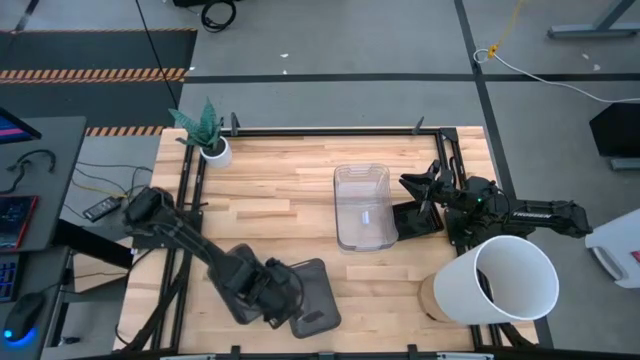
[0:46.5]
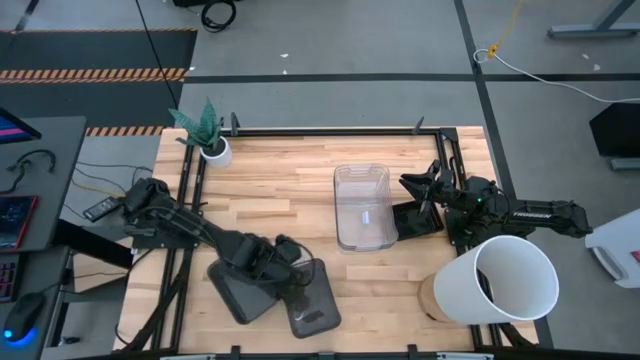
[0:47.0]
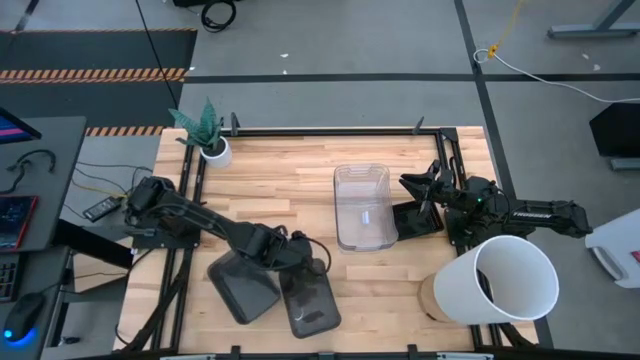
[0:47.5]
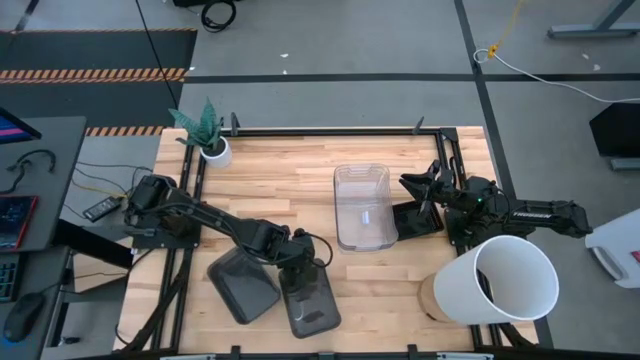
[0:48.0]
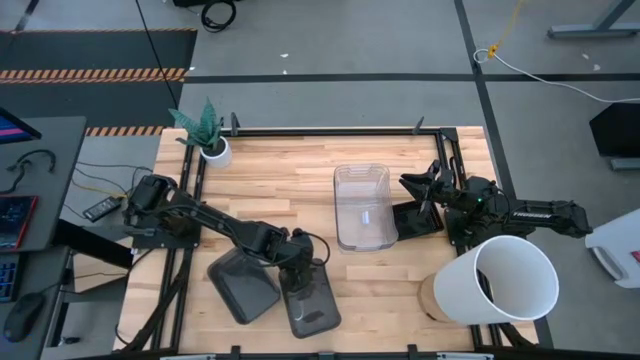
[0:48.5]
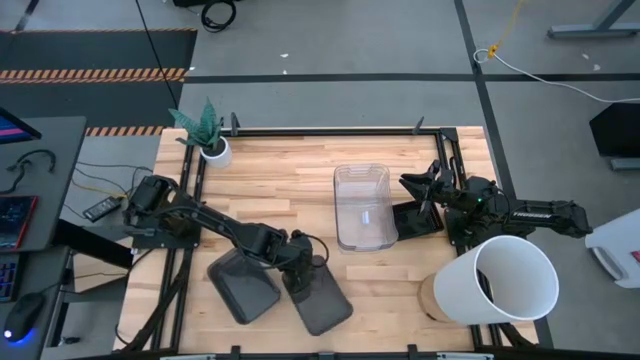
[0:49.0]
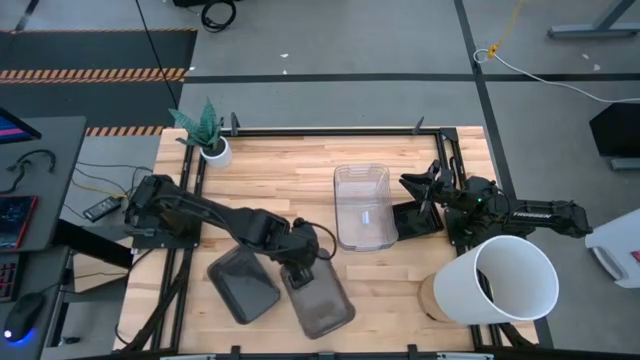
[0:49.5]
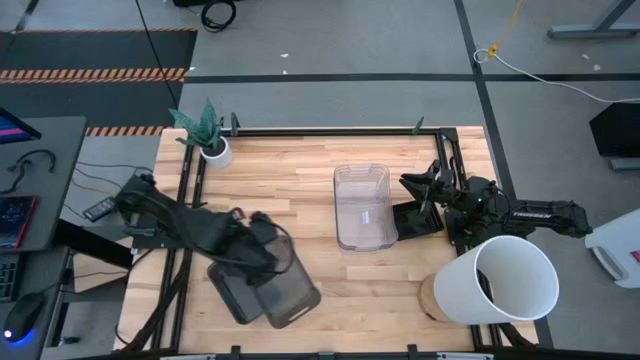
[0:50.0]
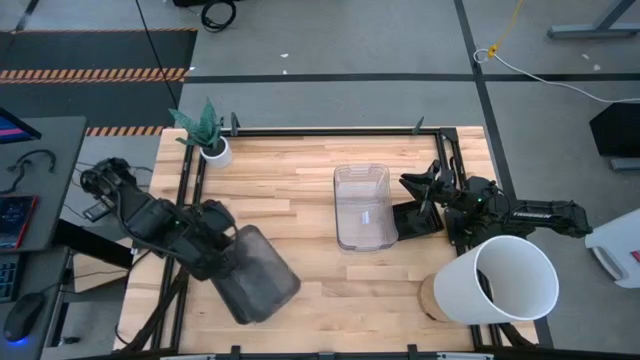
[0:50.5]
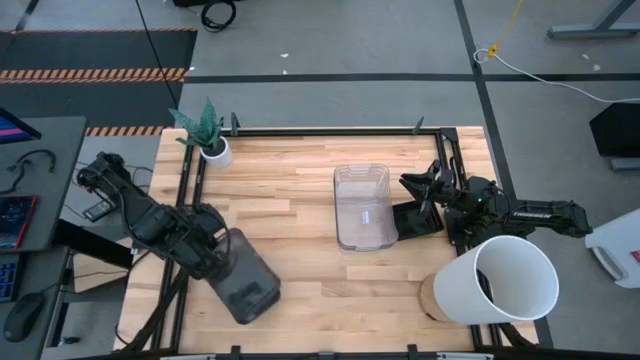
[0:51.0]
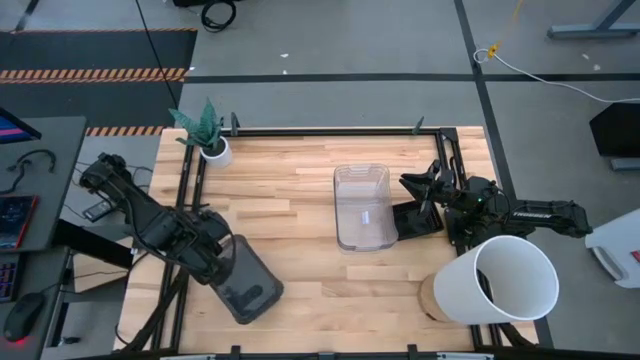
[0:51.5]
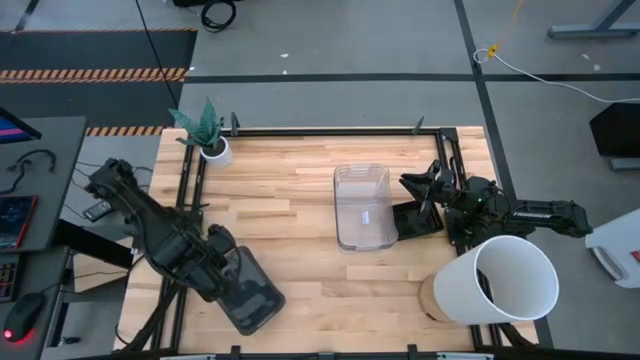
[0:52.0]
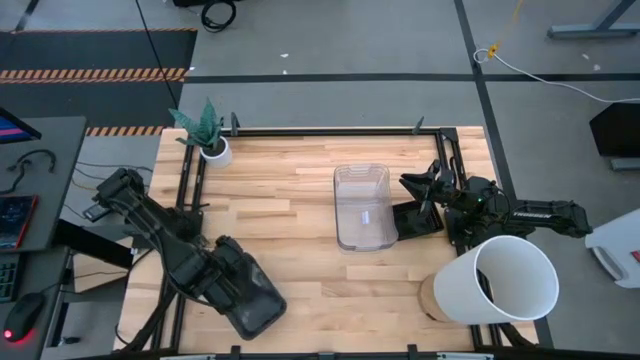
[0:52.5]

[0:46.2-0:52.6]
Stack the right black transparent bin on the stacked left black transparent bin

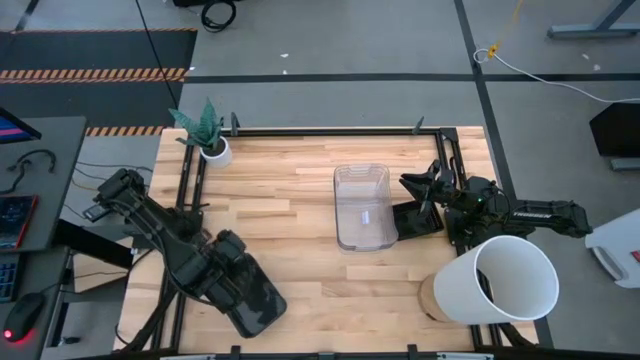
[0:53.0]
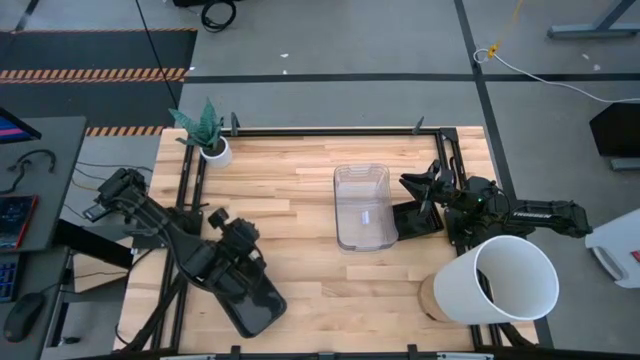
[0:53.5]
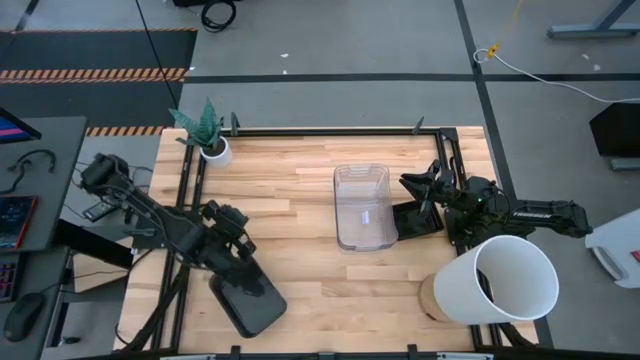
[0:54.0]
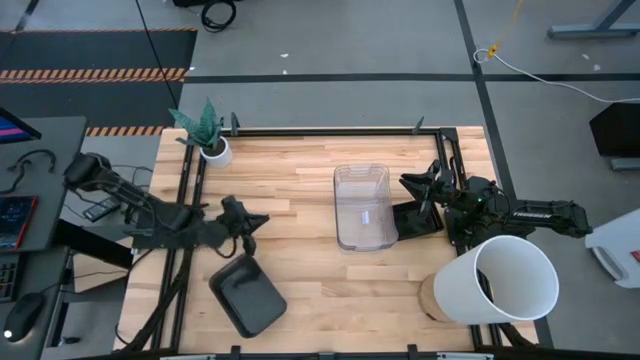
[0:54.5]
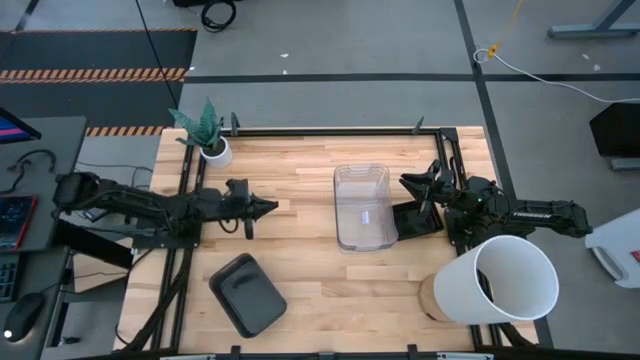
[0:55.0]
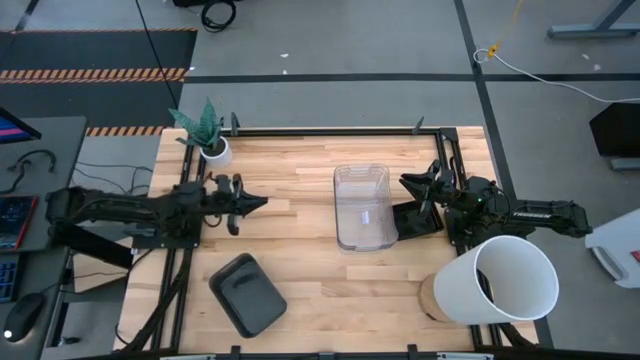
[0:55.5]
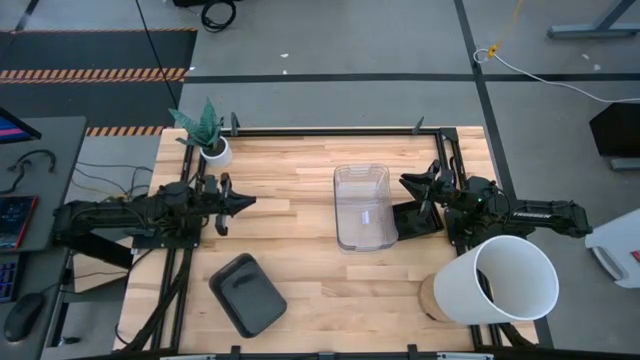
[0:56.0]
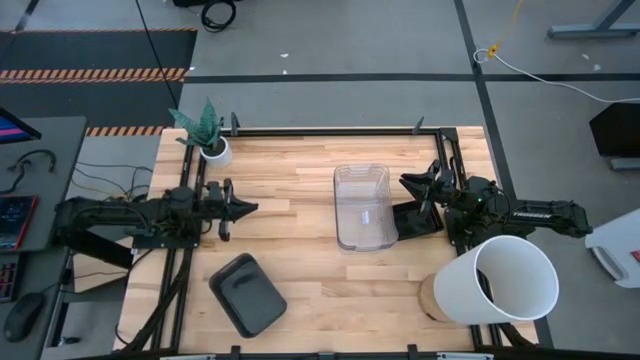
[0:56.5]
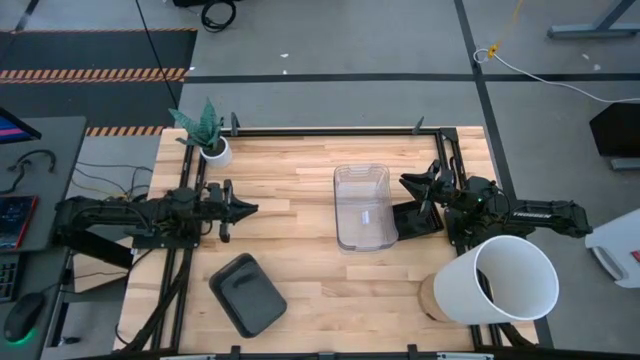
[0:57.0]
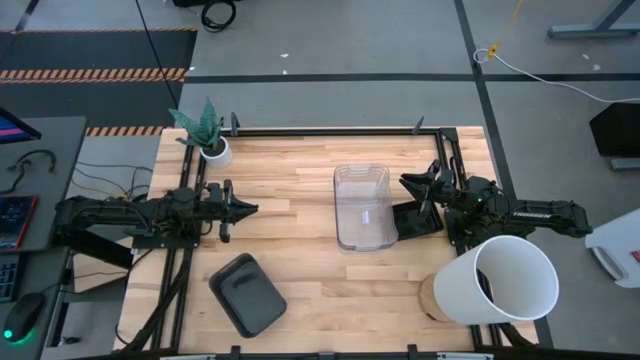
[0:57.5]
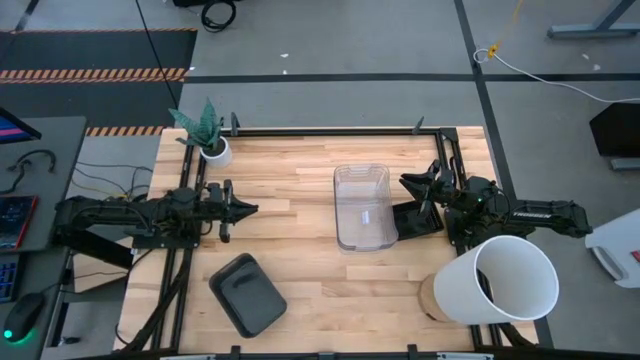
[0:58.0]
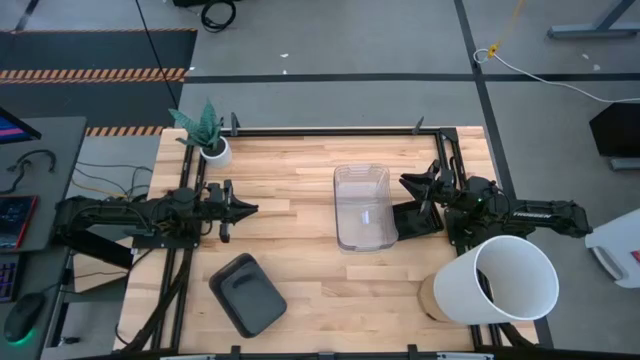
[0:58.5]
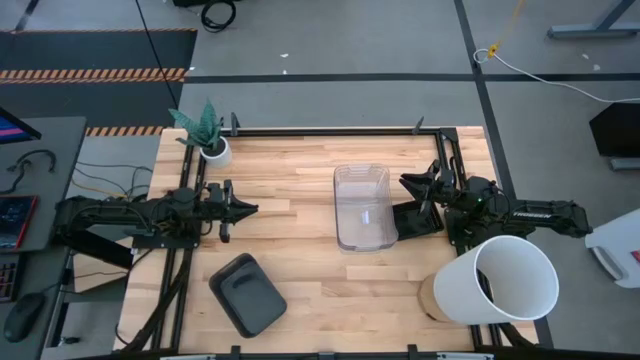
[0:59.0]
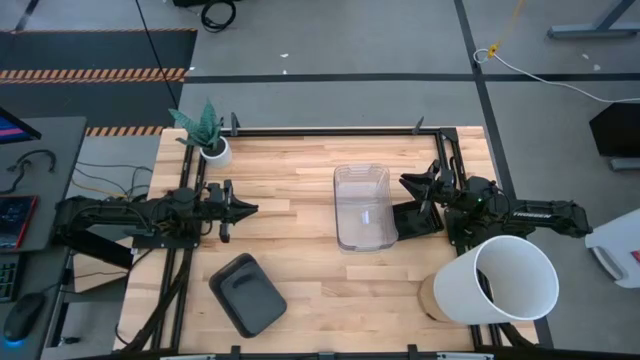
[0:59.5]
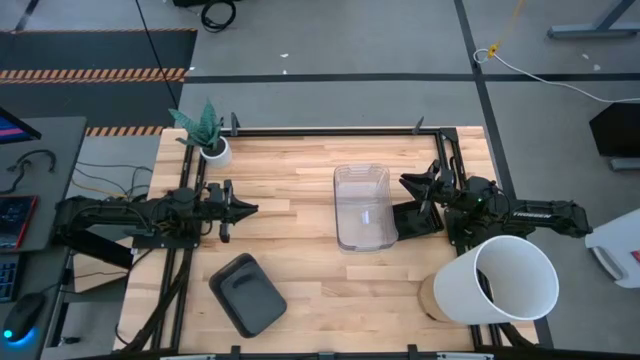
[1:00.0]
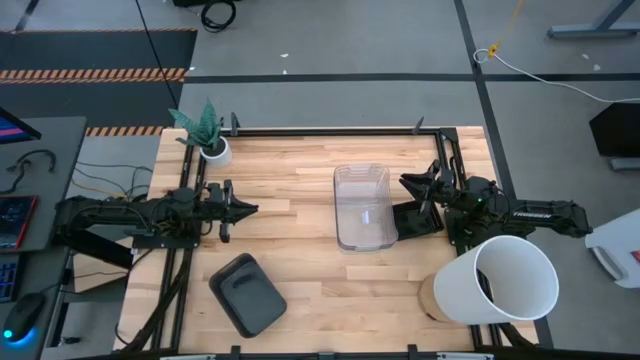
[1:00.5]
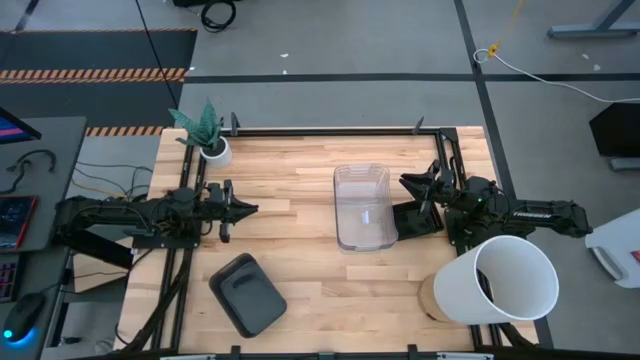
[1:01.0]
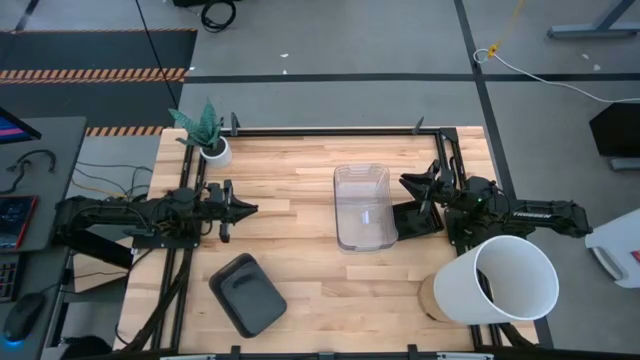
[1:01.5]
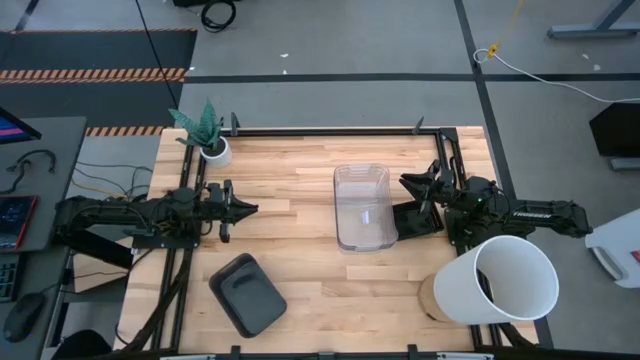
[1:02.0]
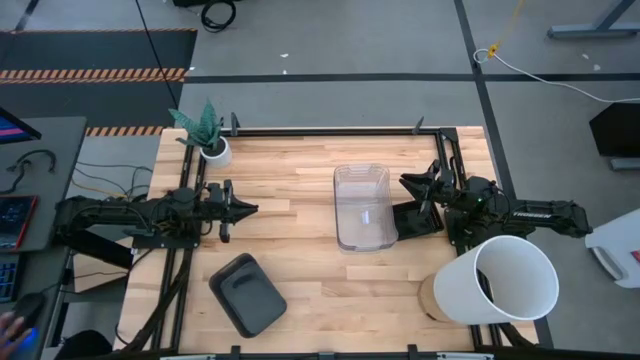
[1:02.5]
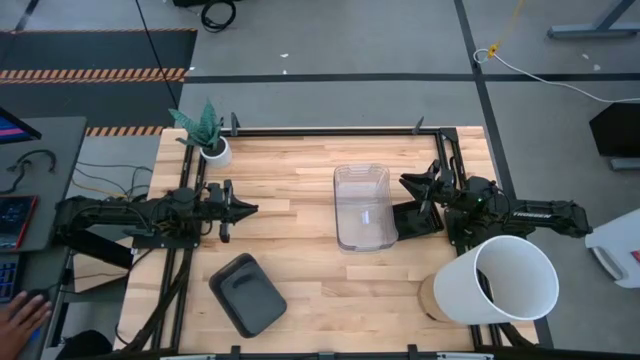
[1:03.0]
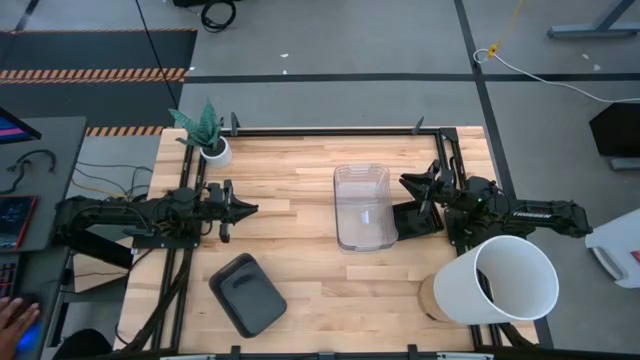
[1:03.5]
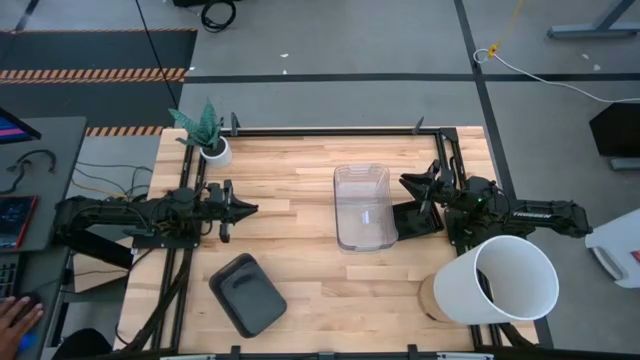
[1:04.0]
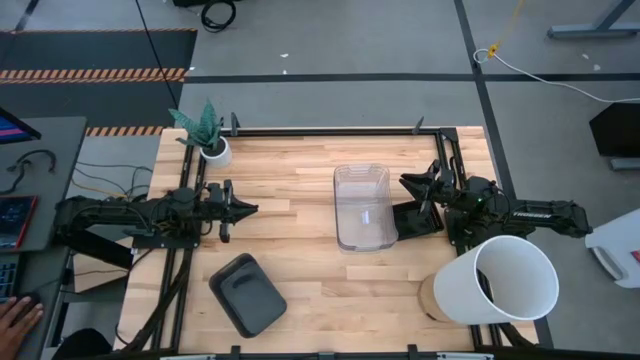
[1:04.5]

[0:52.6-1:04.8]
Return to Home Position
